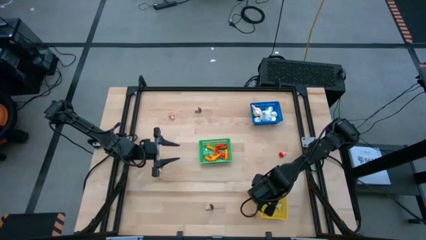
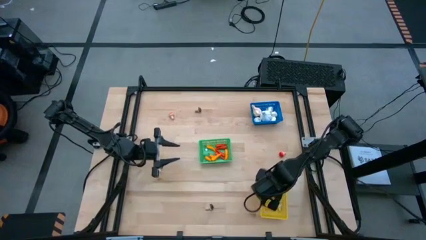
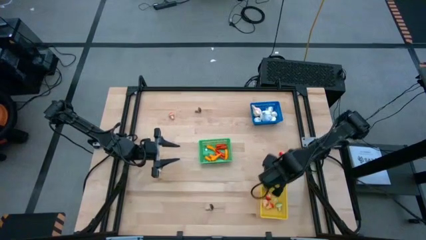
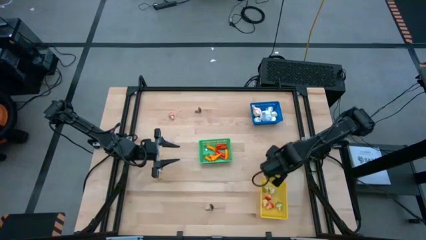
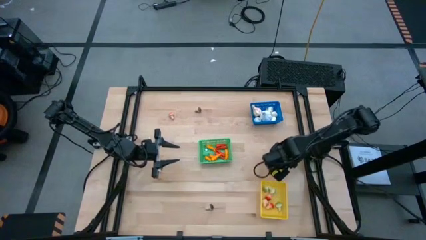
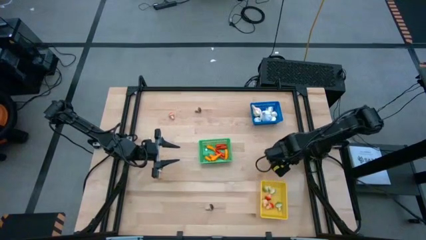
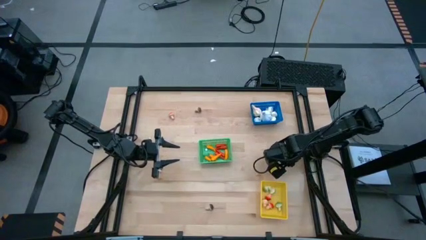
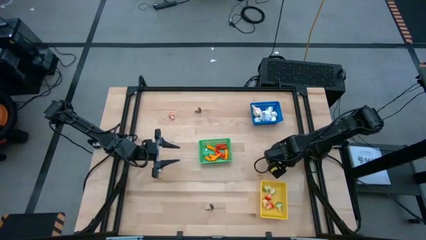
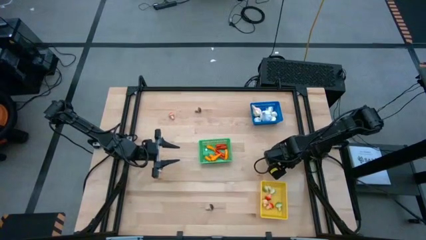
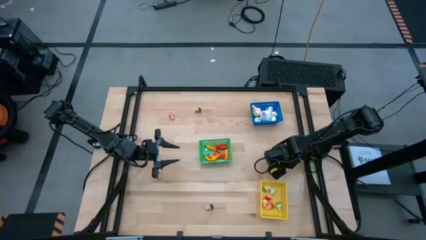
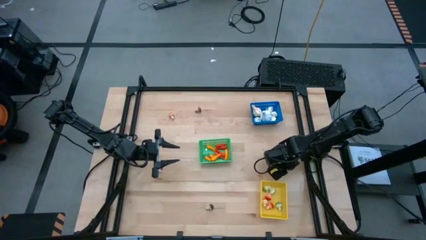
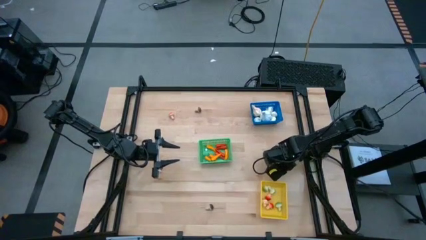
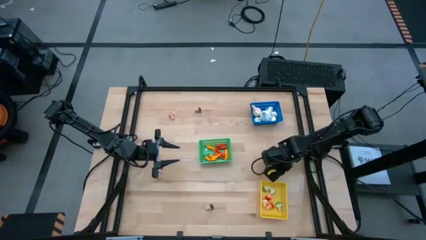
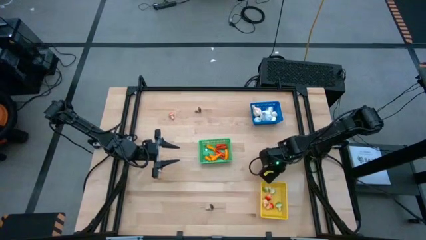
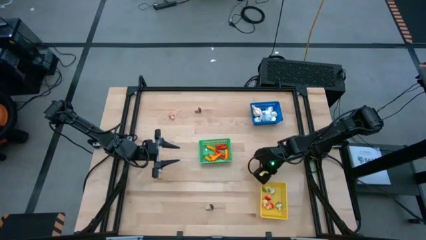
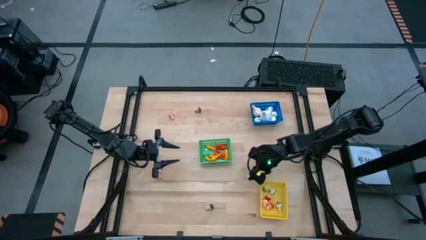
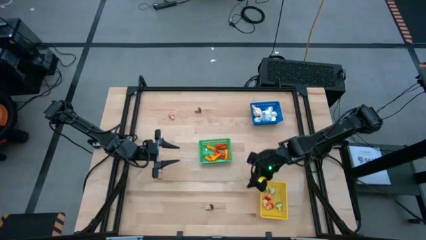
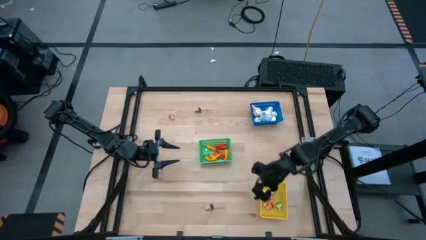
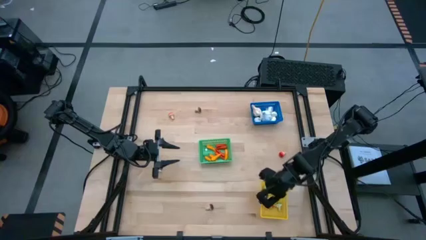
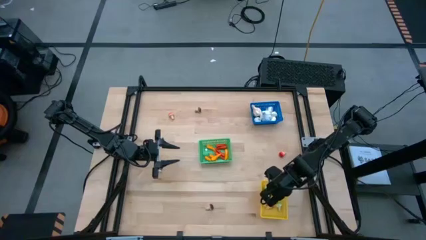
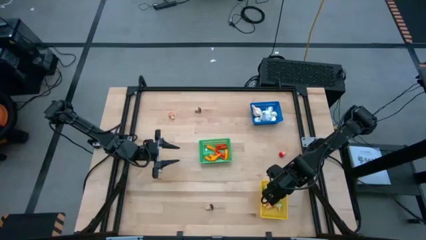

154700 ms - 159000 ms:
Task: Sort produce into baskets
Put the brown mushroom into the yellow bin

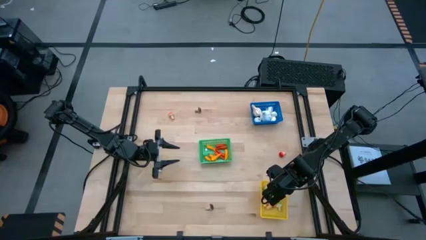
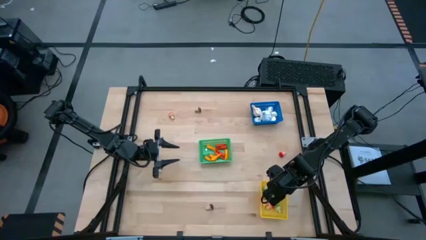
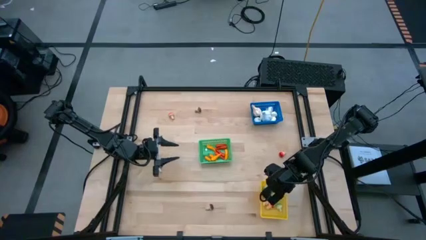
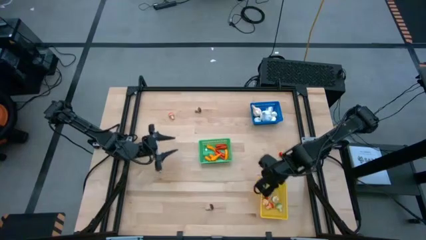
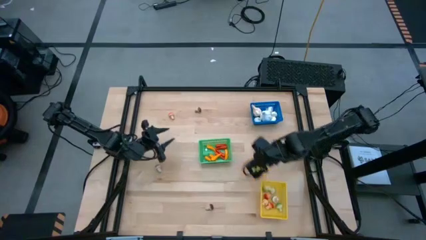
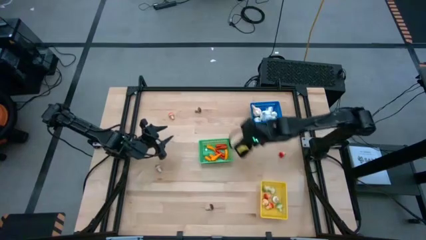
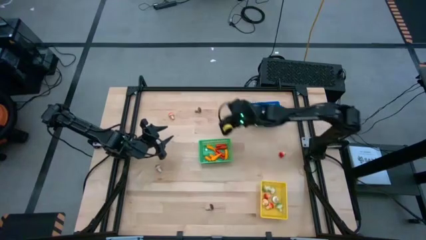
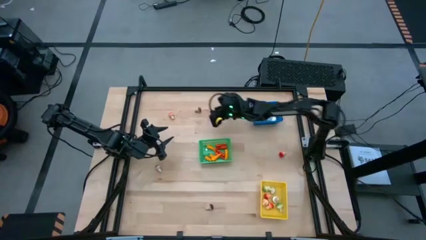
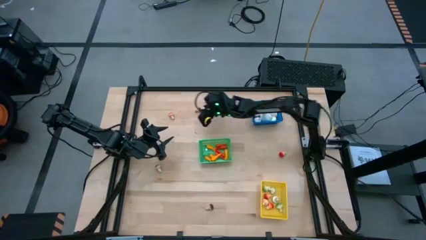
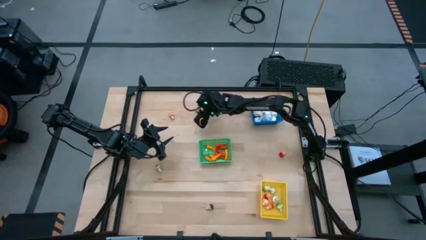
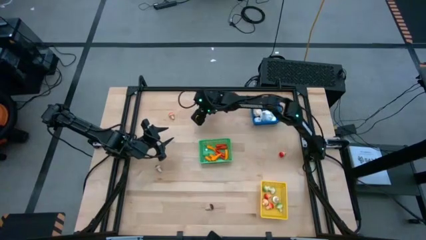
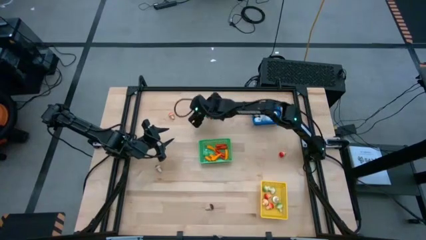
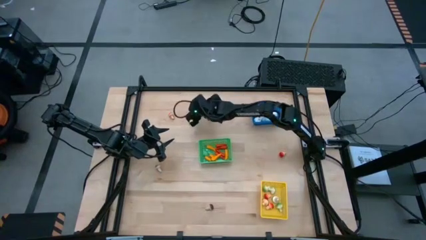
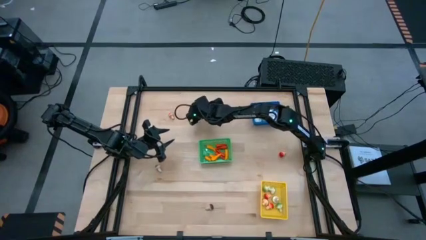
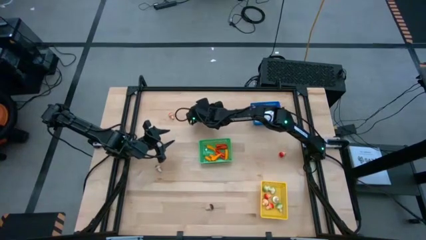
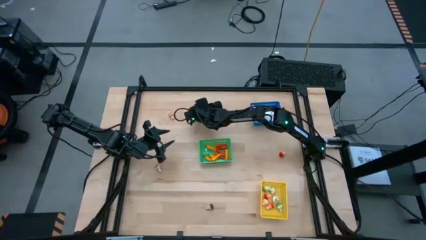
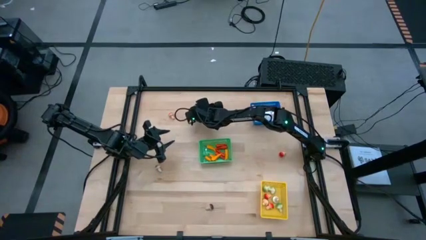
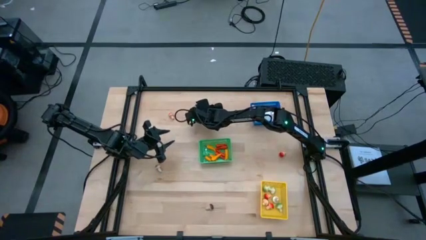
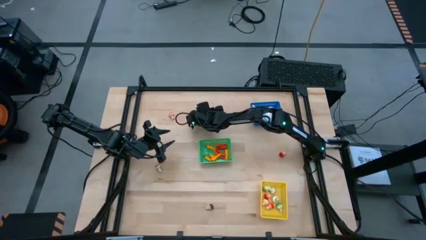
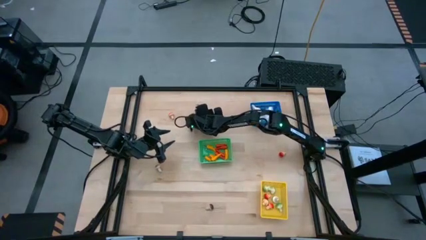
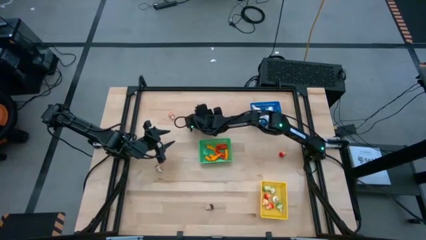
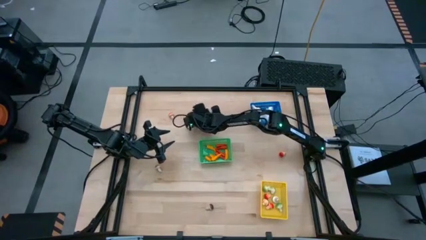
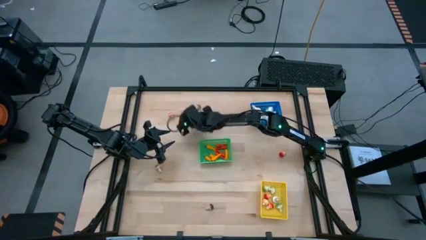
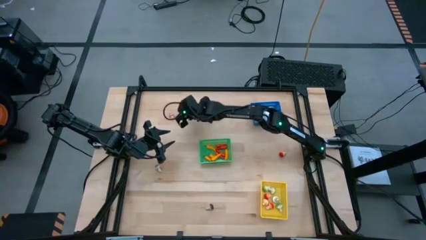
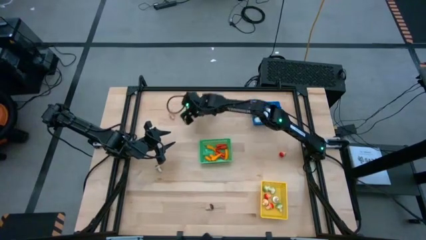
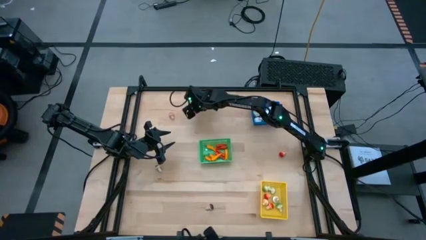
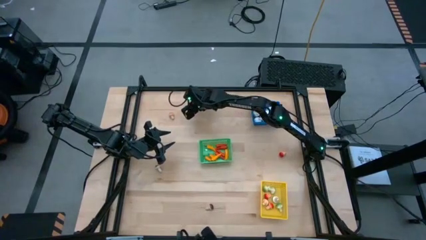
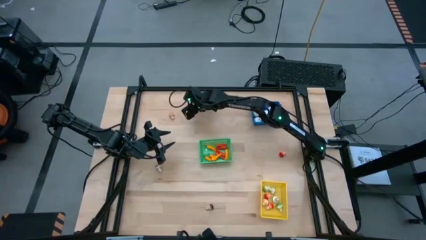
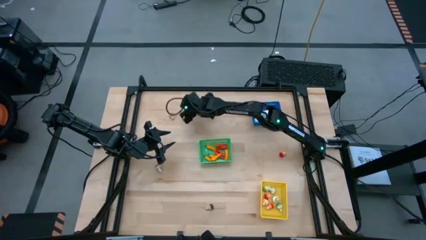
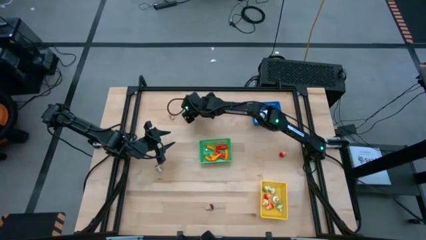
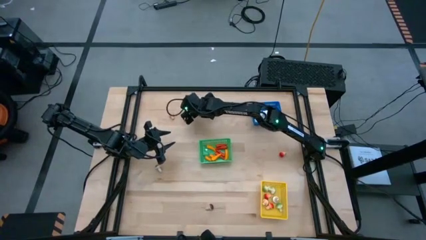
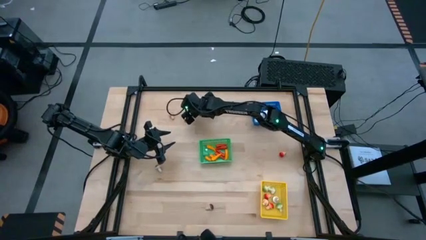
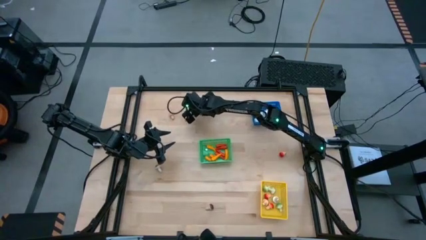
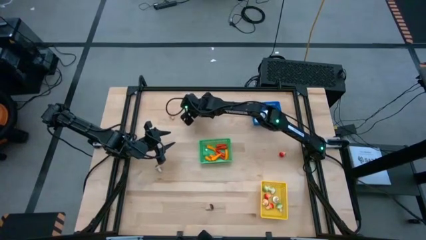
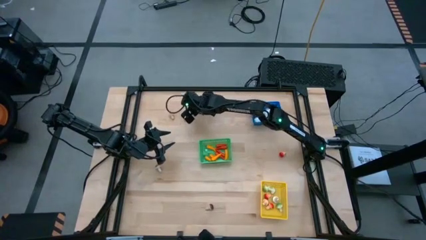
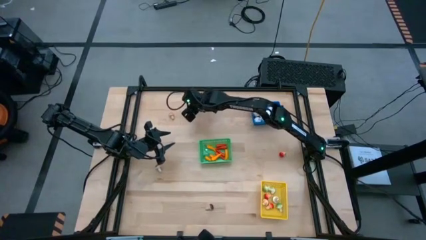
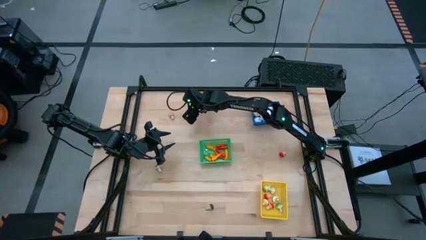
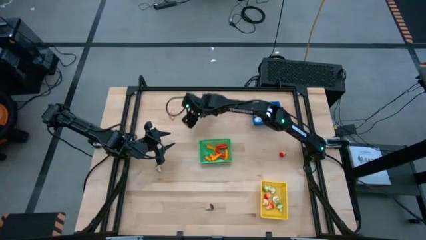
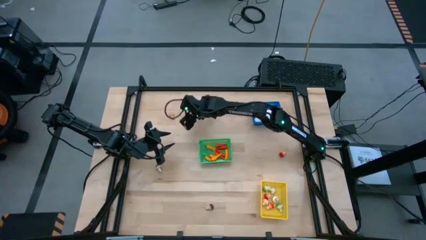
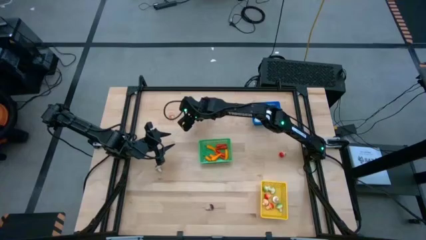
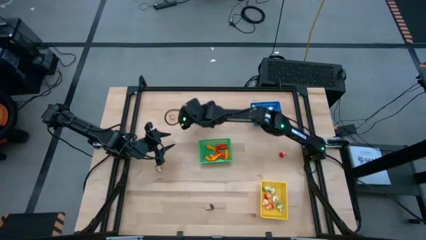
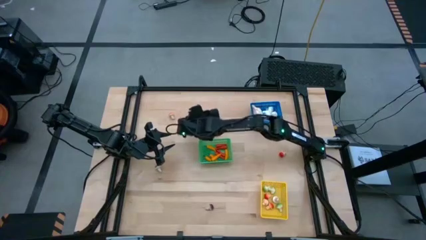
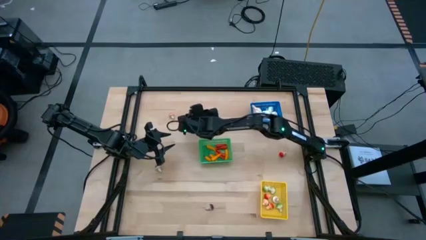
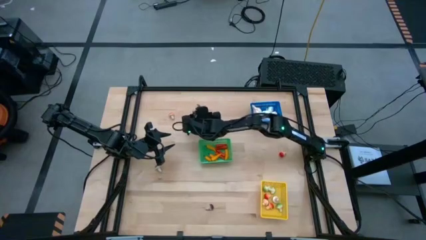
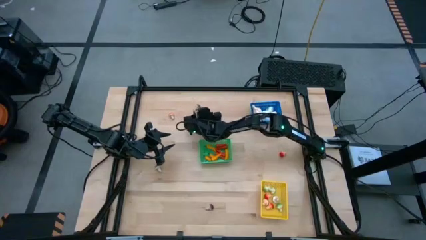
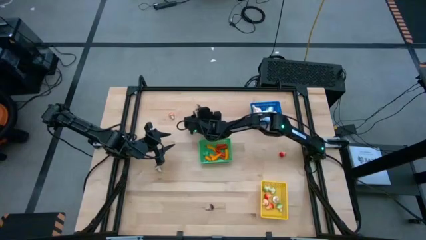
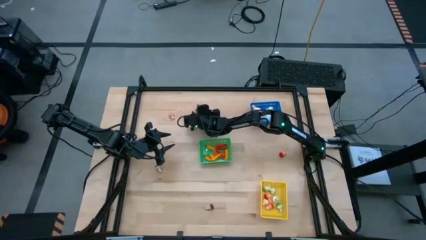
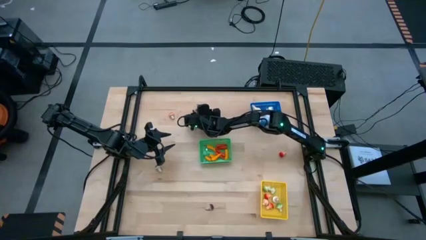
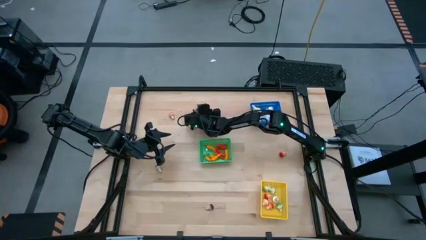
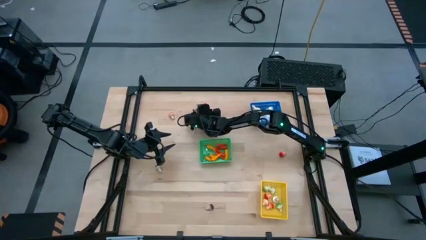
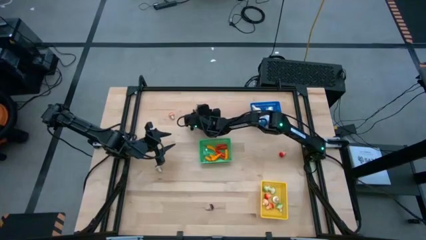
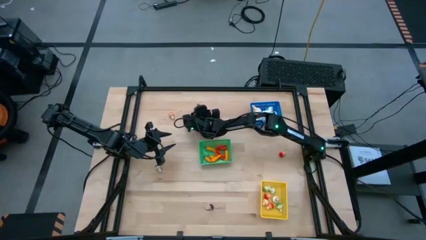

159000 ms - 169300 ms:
Put the brown mushroom into the yellow bin
